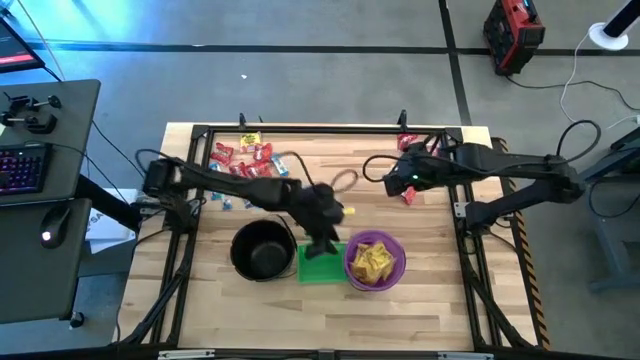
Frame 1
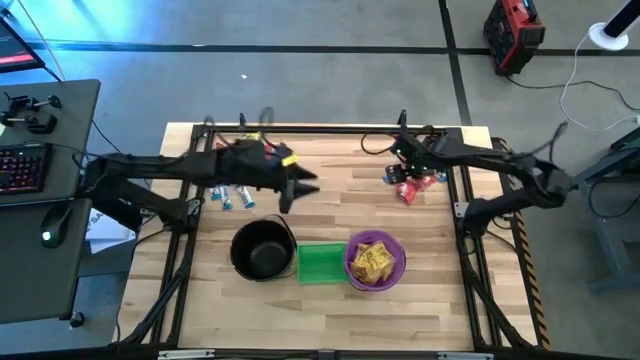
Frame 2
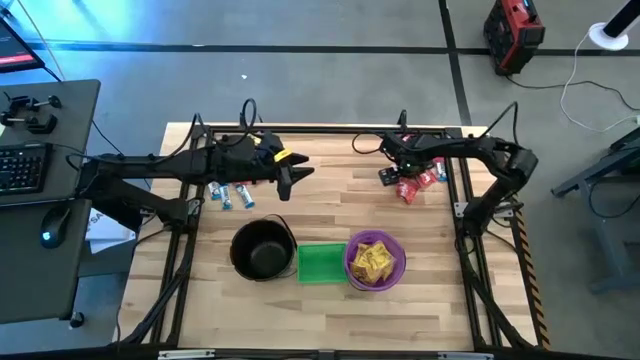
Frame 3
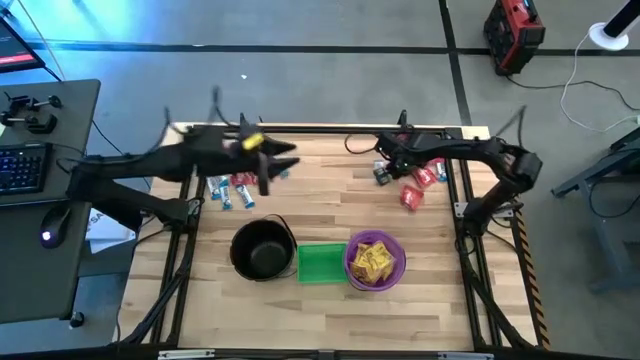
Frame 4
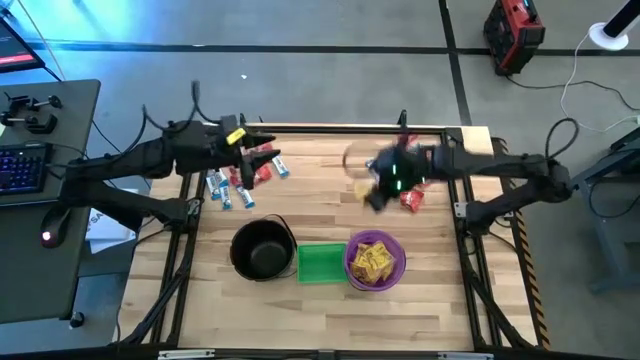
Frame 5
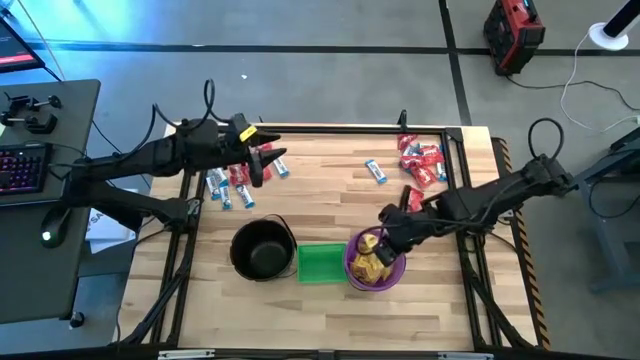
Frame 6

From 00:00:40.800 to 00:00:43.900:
Task: Sort candy by brand, put in halloween buckets
Put the yellow candy into the violet bucket

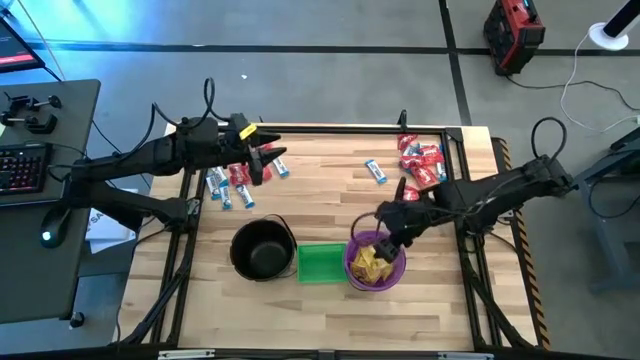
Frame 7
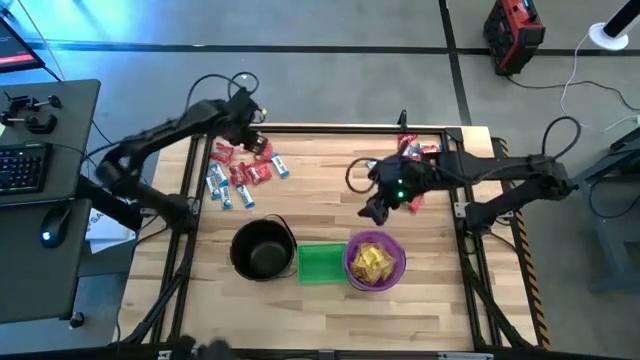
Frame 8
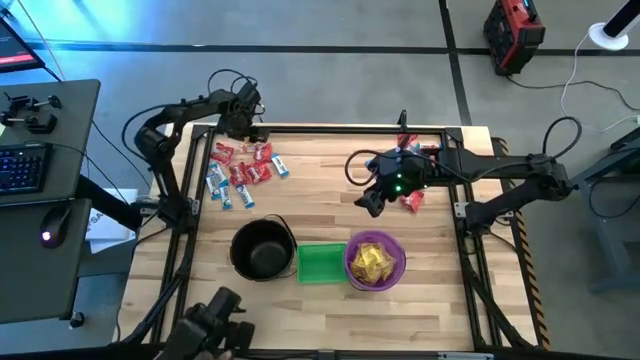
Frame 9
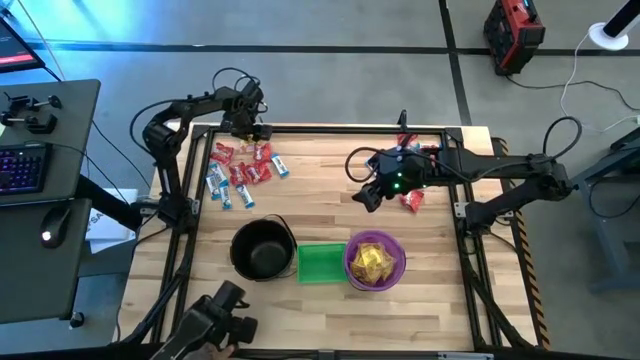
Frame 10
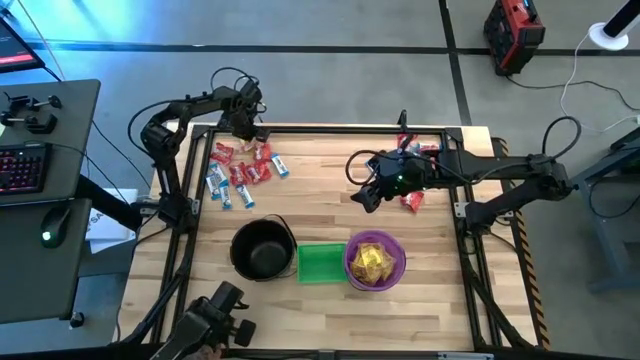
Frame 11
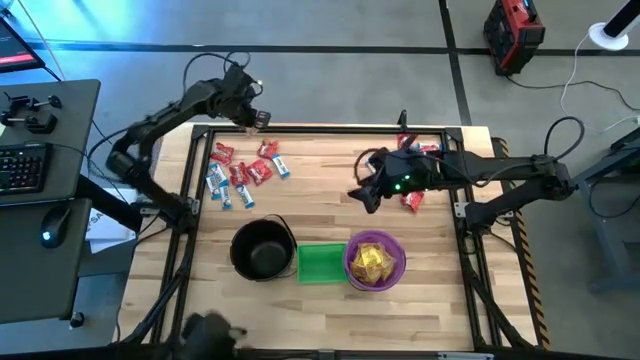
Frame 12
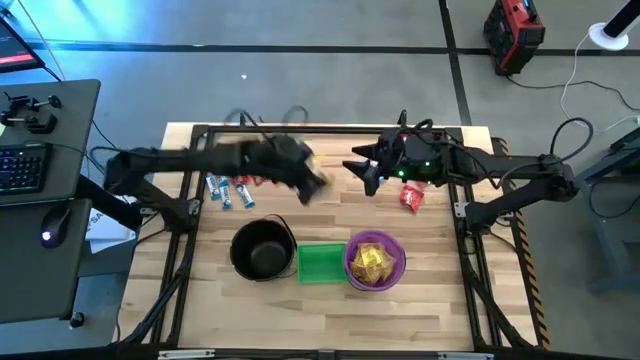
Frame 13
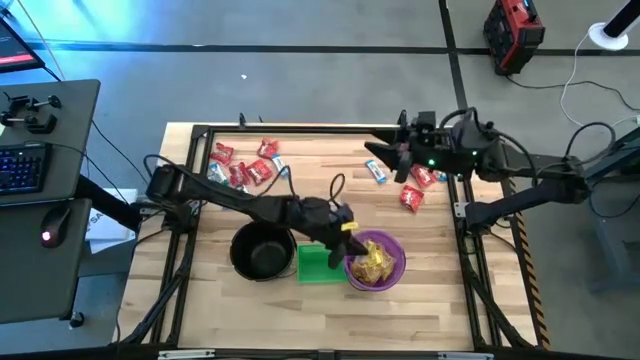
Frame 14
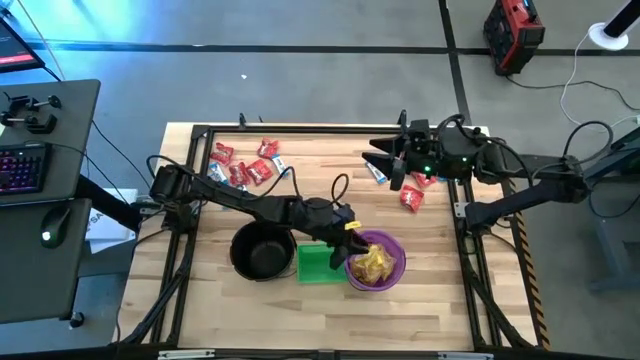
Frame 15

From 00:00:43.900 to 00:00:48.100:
Put the yellow candy into the violet bucket

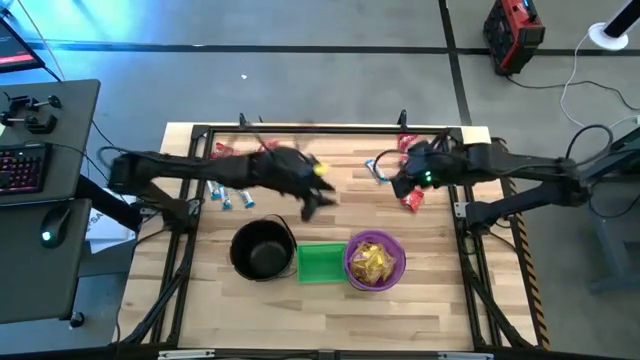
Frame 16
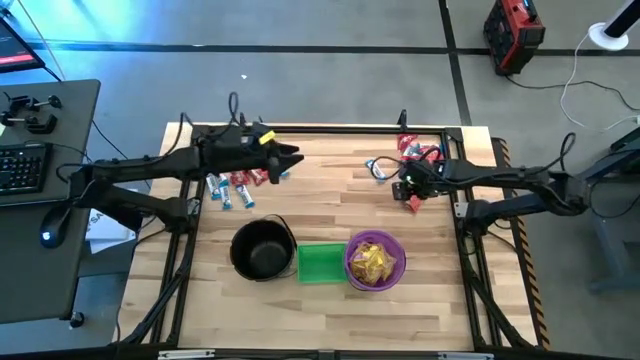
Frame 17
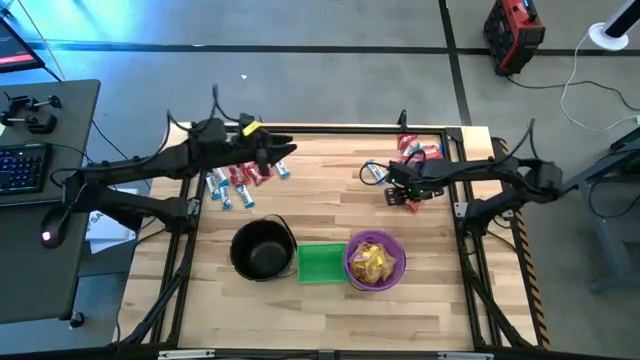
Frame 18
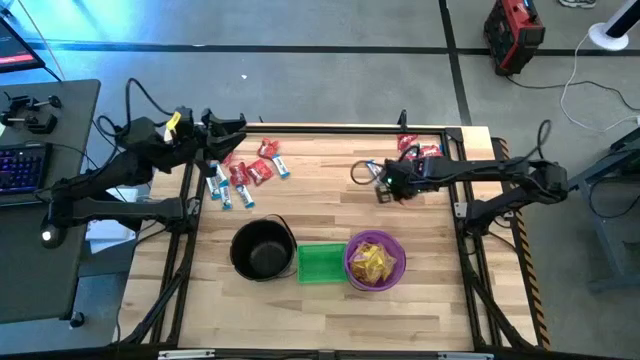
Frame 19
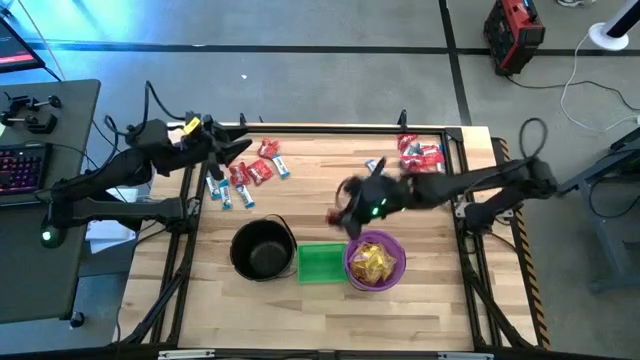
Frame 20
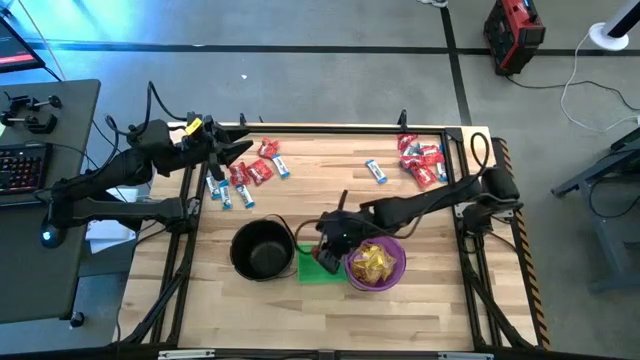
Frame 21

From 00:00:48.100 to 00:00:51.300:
Put the red candy into the green bin

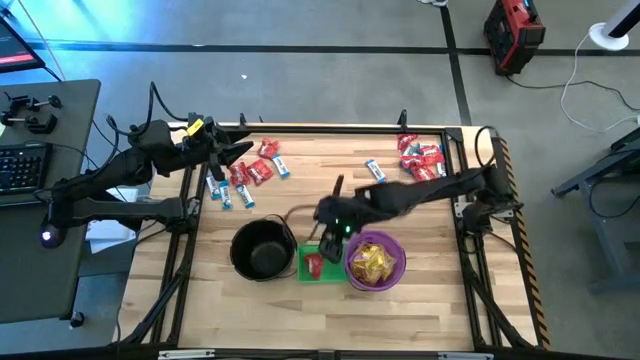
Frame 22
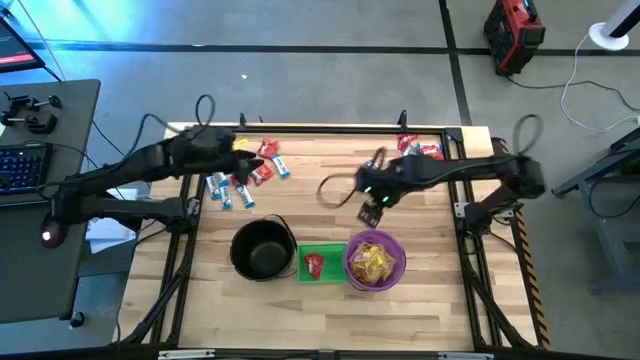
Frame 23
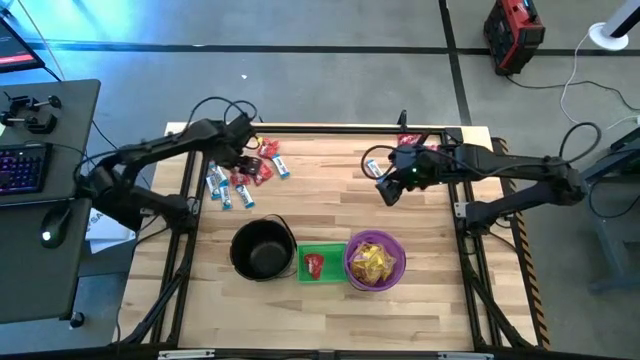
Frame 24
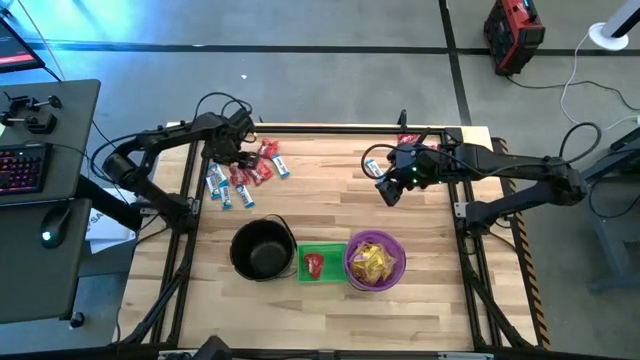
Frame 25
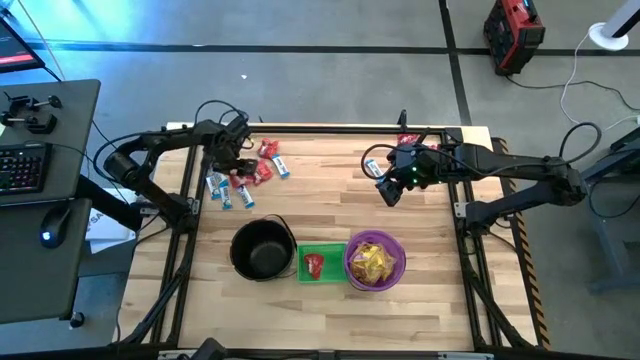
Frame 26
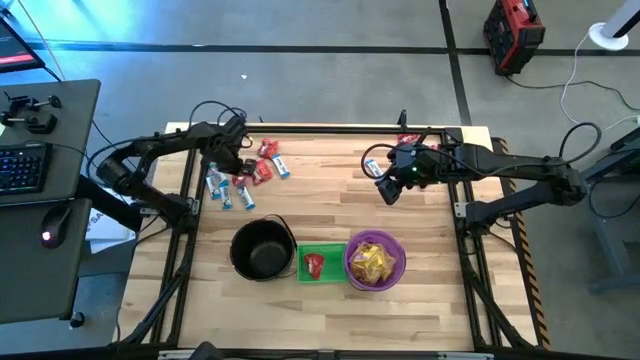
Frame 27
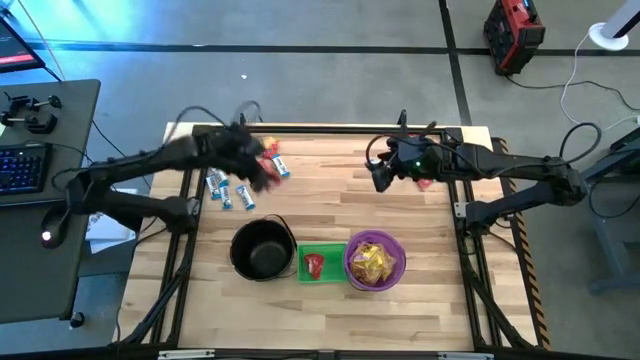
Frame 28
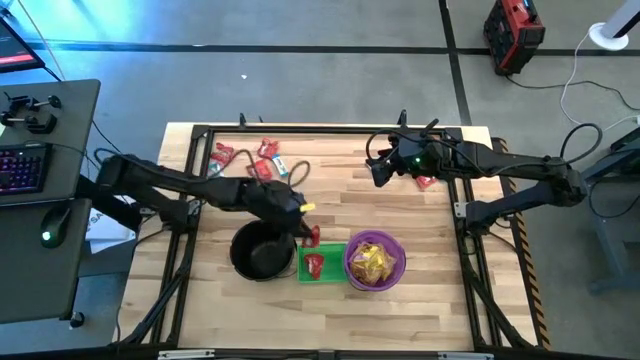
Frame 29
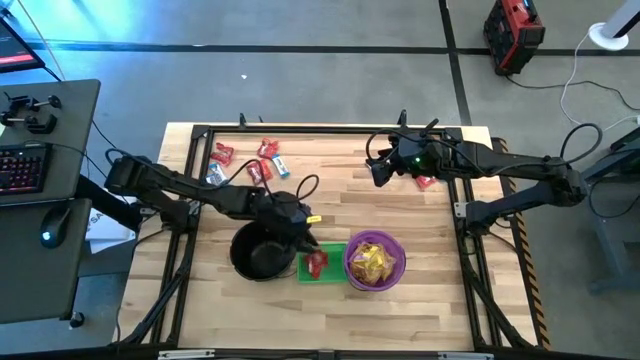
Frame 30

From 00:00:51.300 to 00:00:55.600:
Put the red candy into the green bin

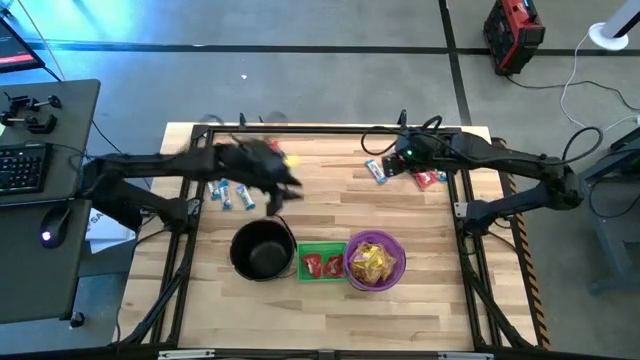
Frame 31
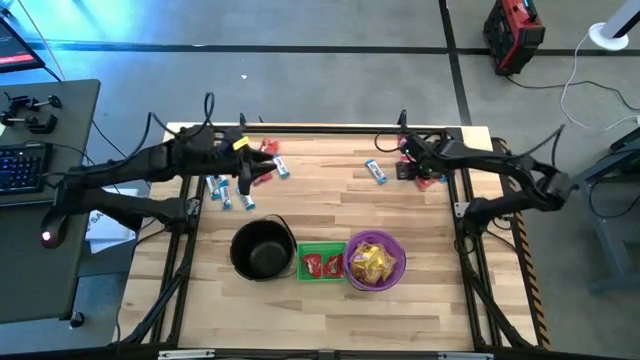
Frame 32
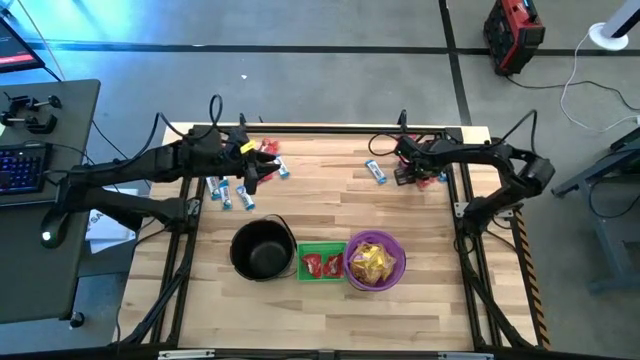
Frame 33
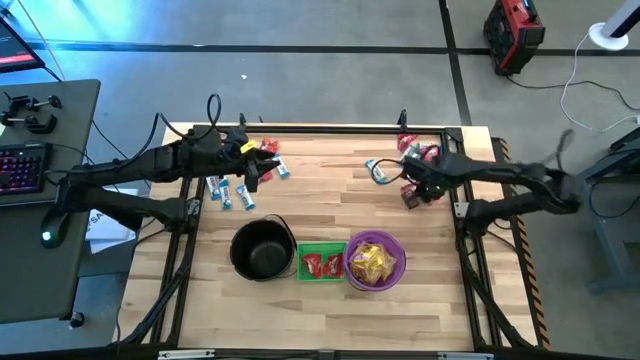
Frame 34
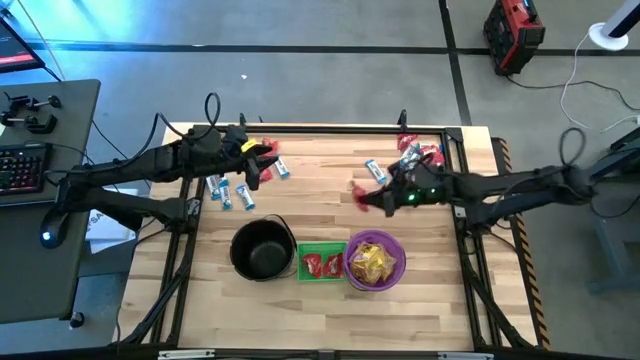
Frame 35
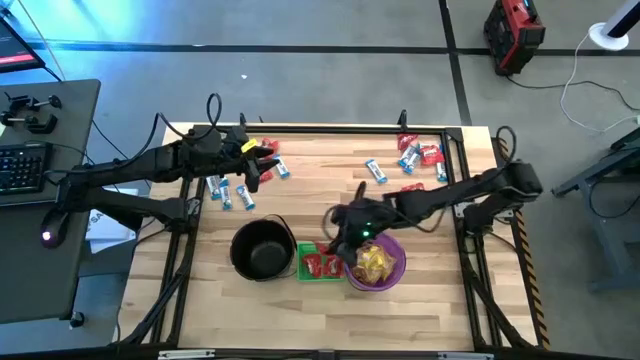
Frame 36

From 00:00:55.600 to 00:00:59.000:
Put the red candy into the green bin

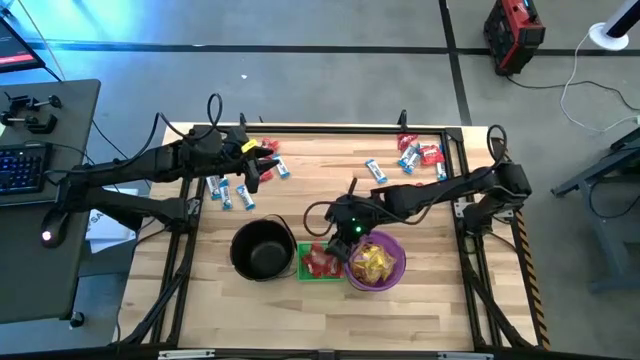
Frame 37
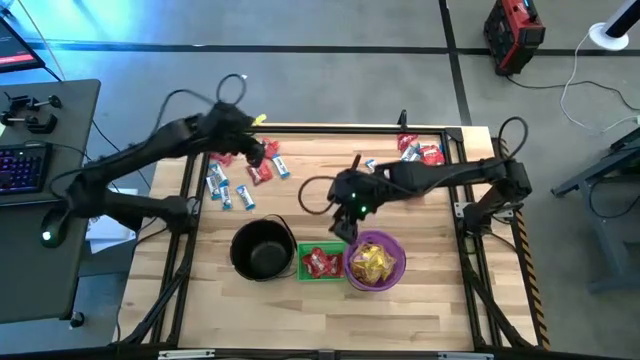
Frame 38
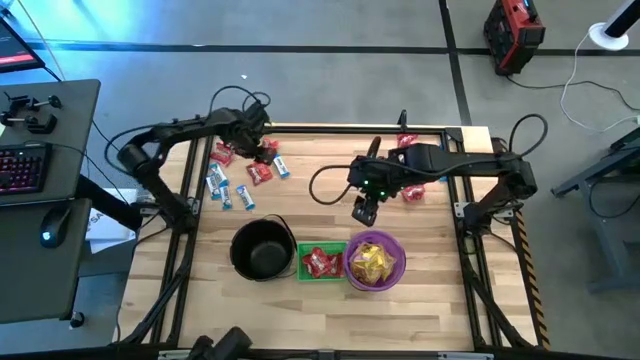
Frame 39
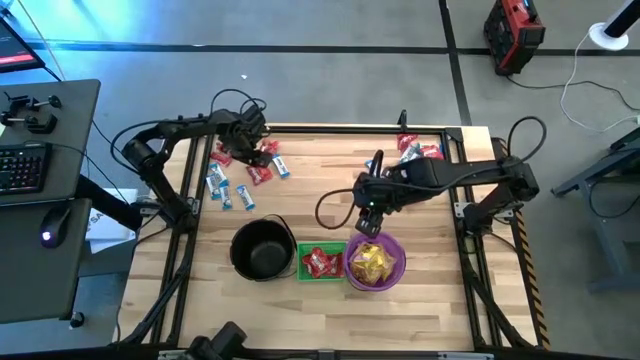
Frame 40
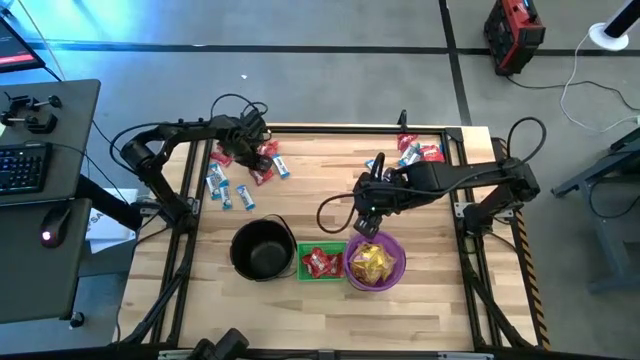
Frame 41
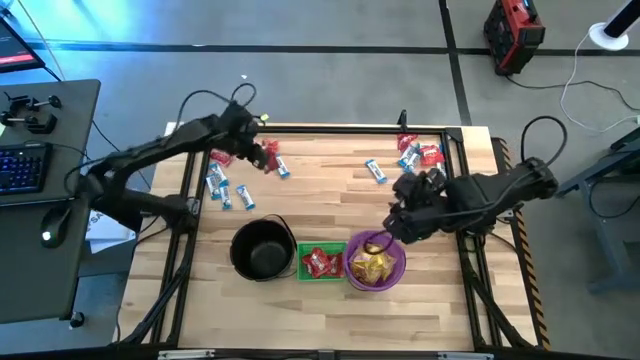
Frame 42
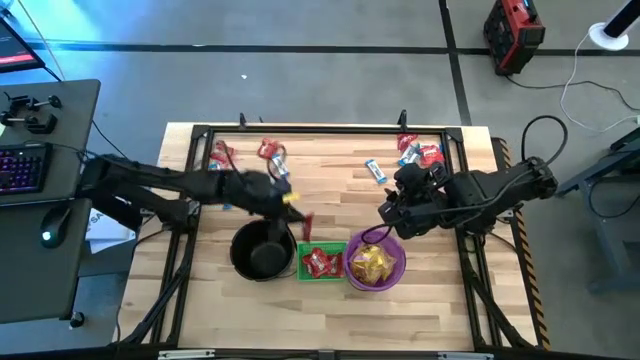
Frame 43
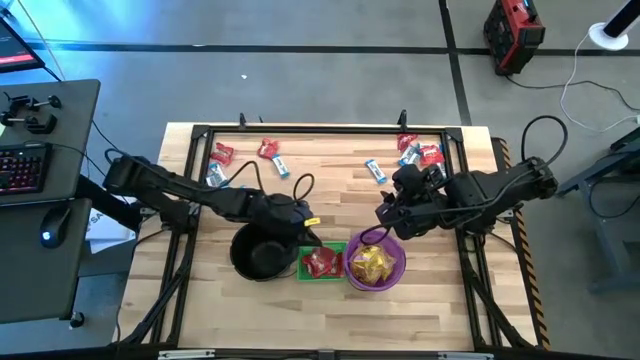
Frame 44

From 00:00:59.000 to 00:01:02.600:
Put the red candy into the green bin
